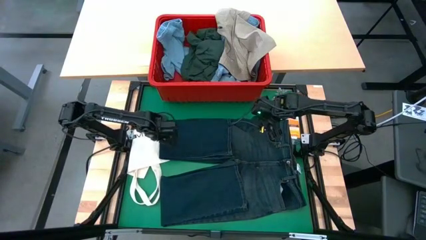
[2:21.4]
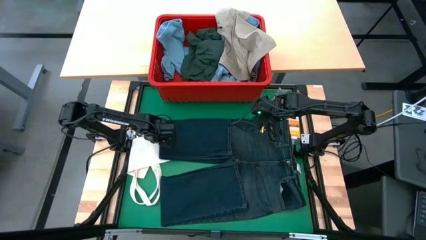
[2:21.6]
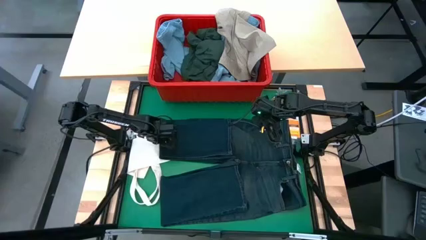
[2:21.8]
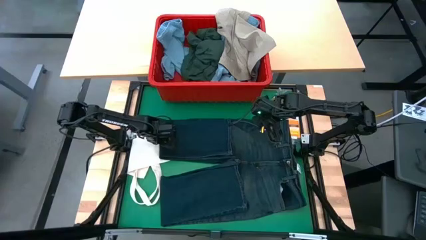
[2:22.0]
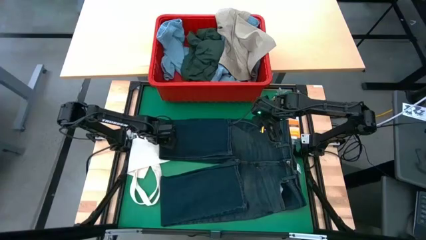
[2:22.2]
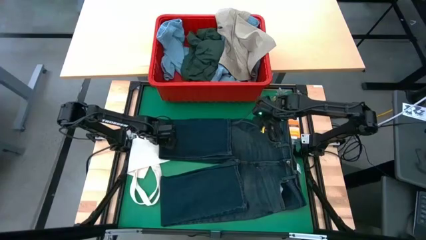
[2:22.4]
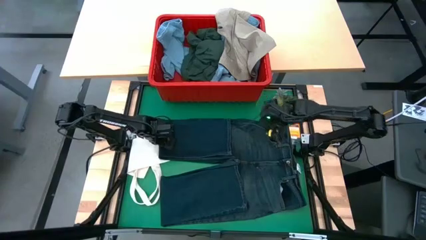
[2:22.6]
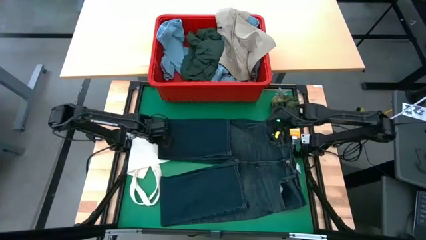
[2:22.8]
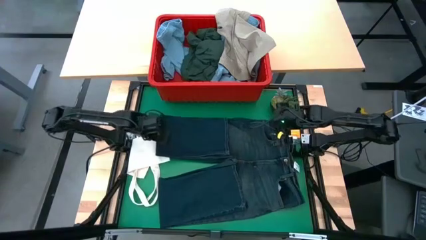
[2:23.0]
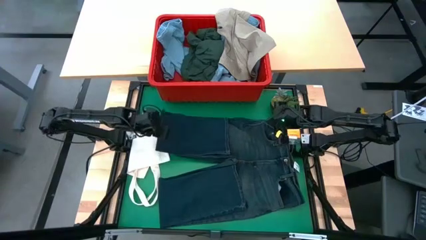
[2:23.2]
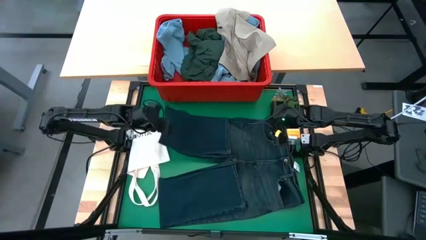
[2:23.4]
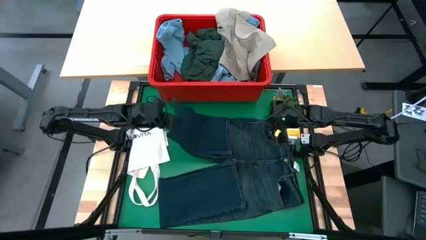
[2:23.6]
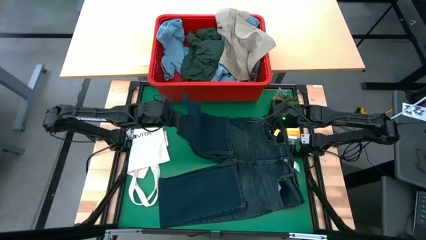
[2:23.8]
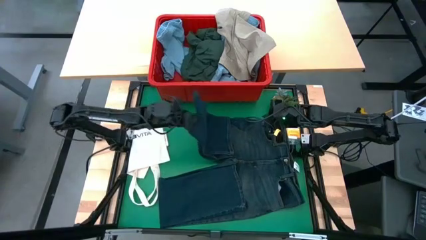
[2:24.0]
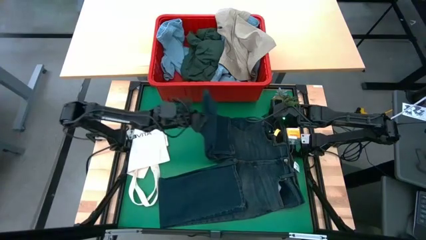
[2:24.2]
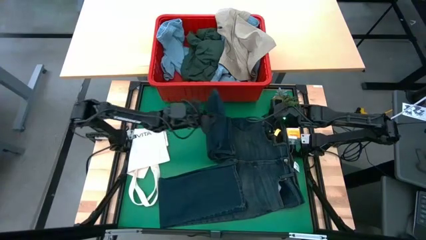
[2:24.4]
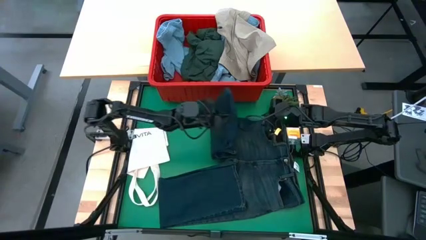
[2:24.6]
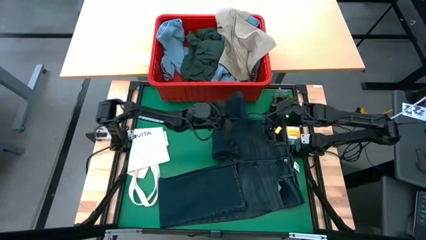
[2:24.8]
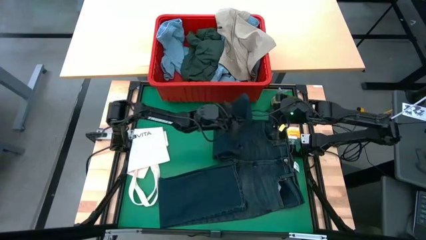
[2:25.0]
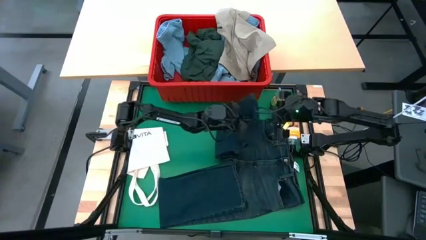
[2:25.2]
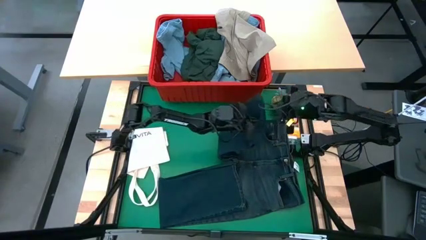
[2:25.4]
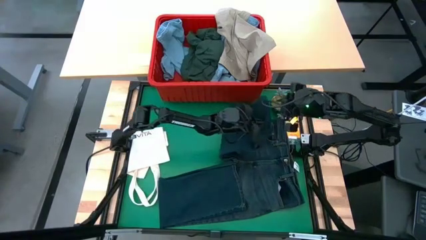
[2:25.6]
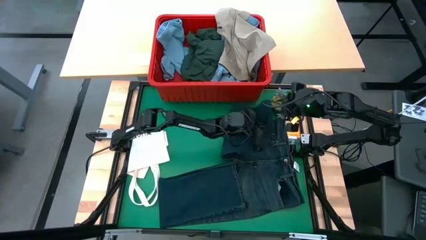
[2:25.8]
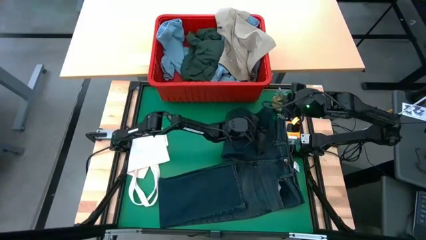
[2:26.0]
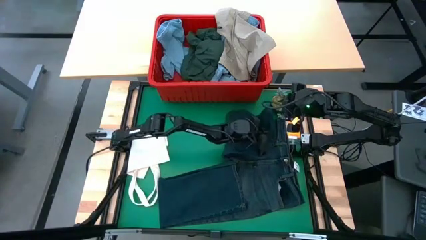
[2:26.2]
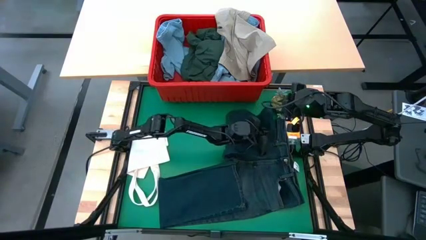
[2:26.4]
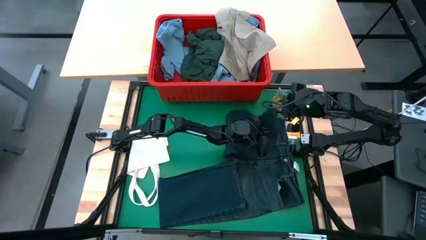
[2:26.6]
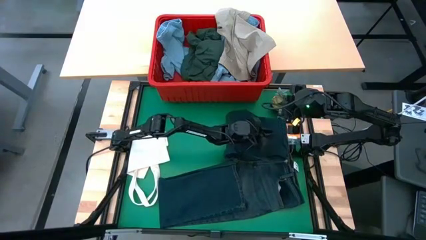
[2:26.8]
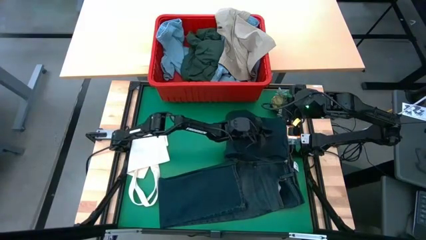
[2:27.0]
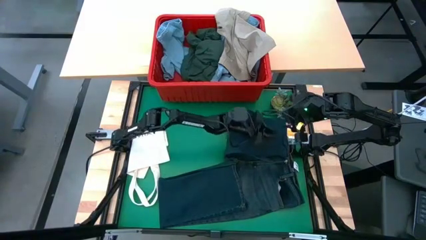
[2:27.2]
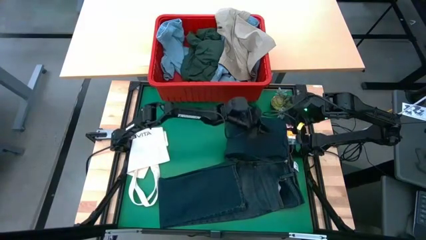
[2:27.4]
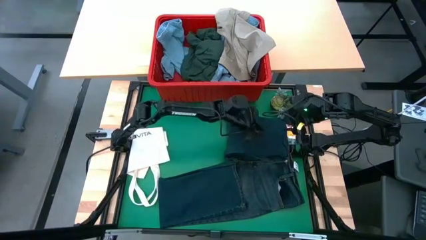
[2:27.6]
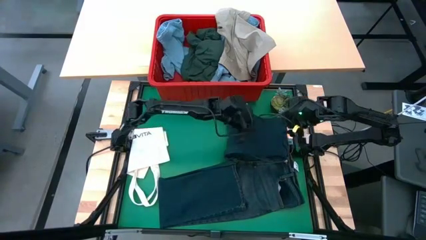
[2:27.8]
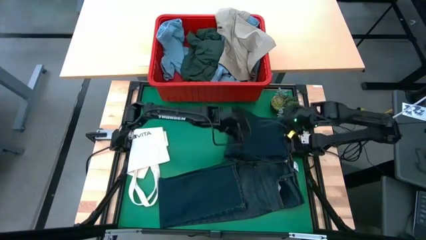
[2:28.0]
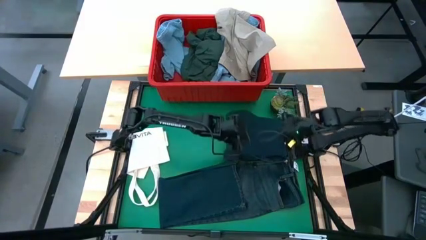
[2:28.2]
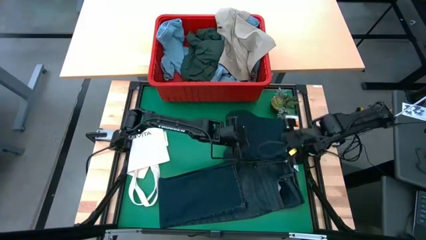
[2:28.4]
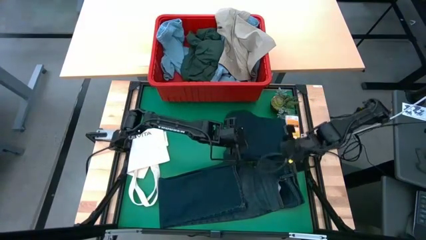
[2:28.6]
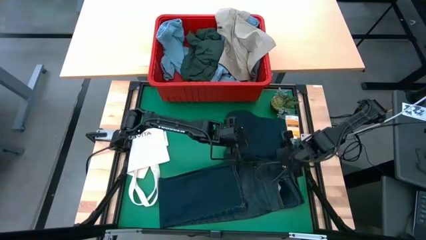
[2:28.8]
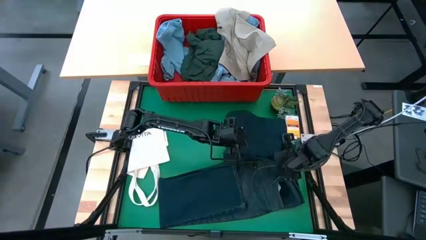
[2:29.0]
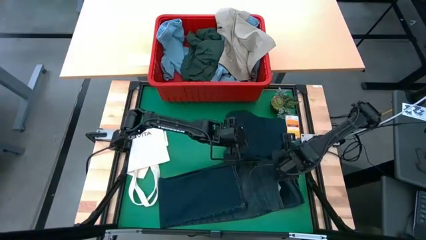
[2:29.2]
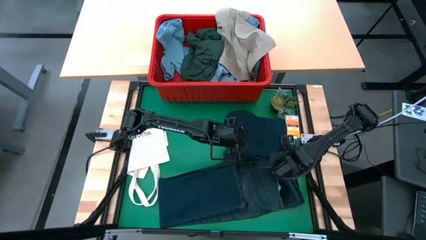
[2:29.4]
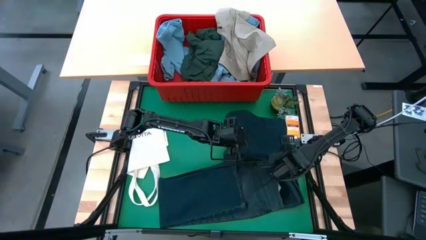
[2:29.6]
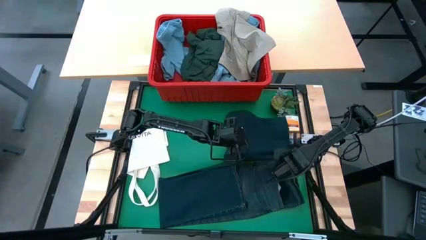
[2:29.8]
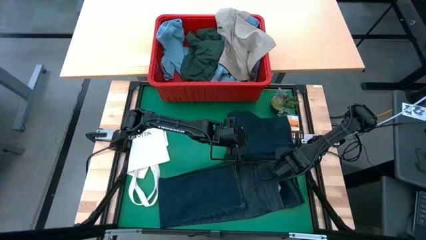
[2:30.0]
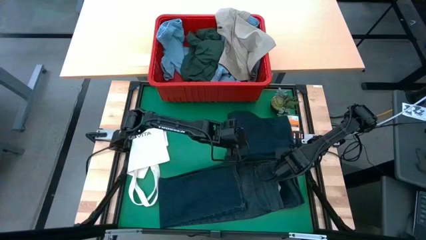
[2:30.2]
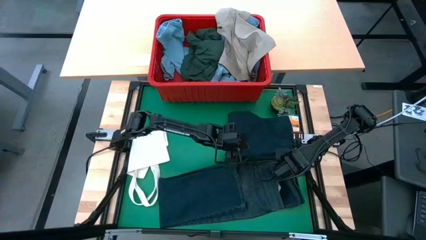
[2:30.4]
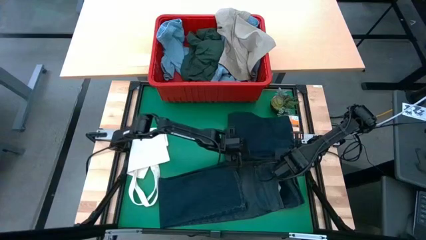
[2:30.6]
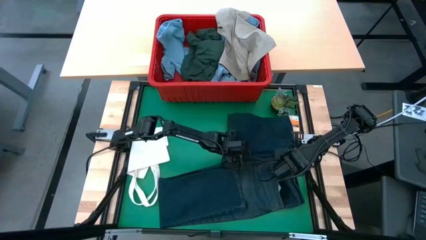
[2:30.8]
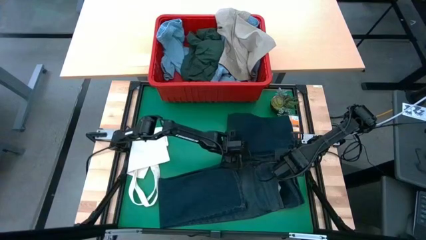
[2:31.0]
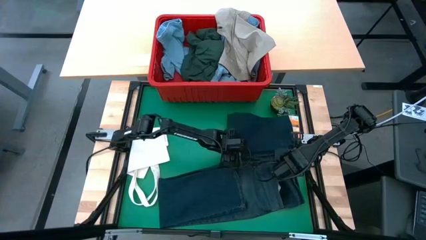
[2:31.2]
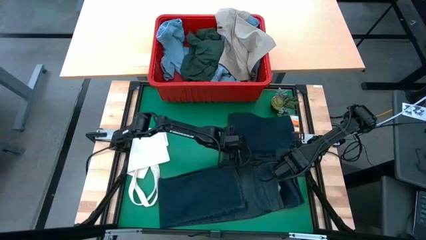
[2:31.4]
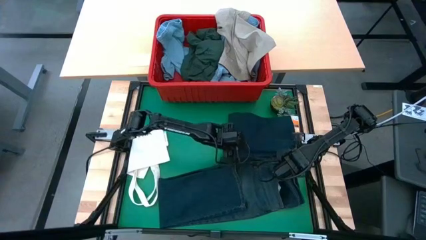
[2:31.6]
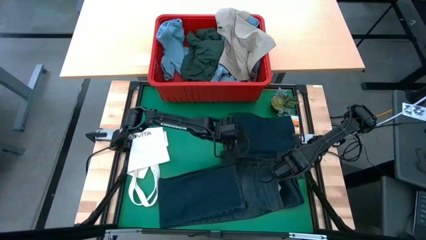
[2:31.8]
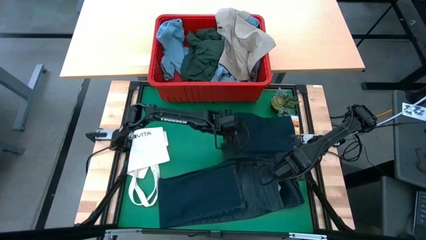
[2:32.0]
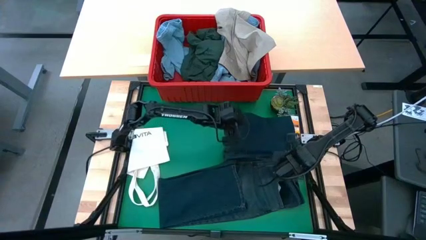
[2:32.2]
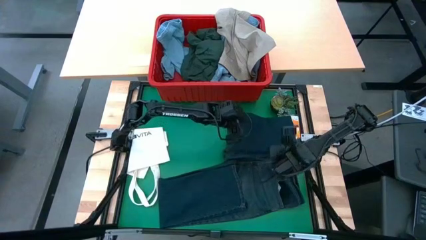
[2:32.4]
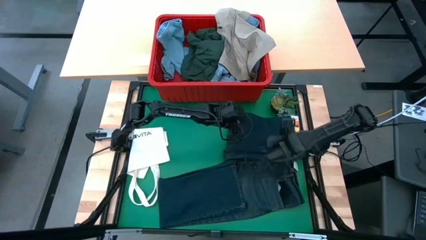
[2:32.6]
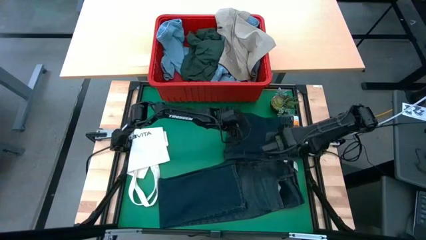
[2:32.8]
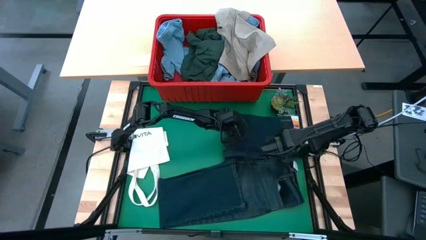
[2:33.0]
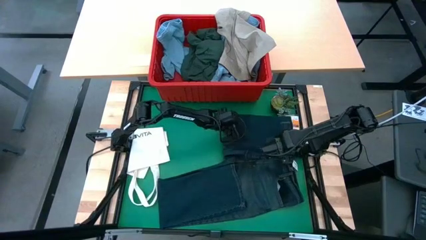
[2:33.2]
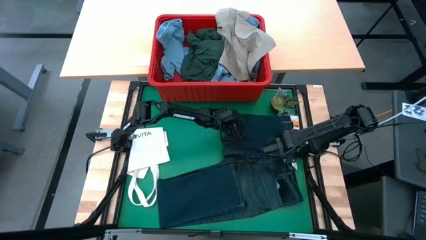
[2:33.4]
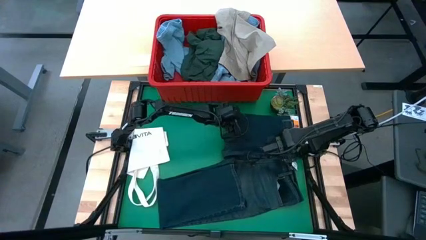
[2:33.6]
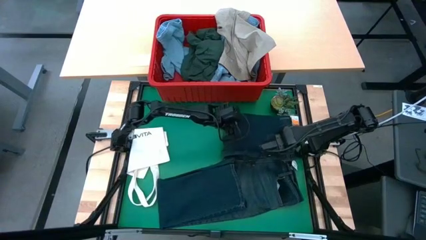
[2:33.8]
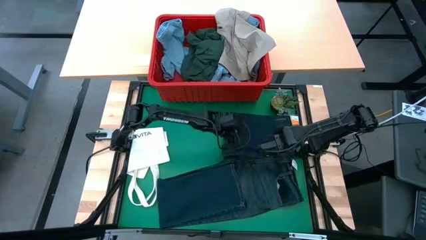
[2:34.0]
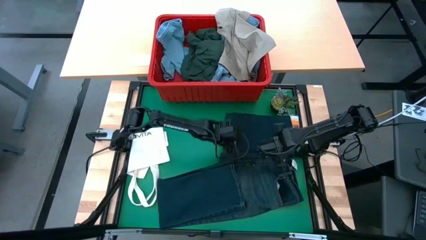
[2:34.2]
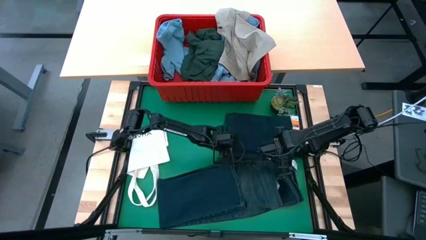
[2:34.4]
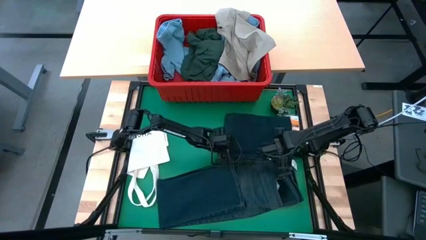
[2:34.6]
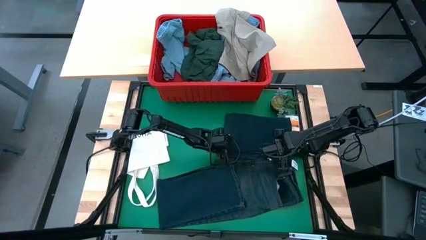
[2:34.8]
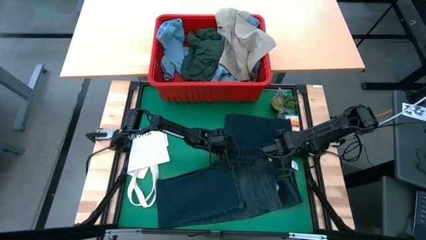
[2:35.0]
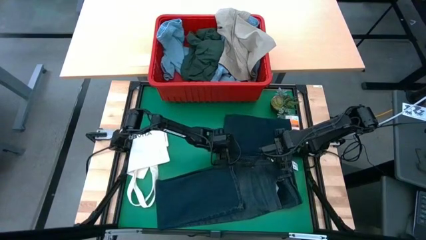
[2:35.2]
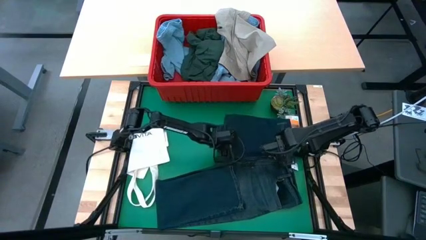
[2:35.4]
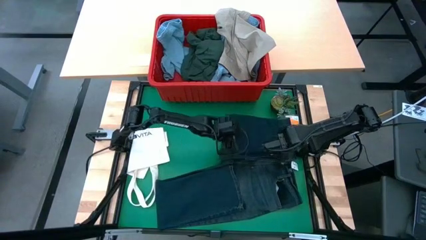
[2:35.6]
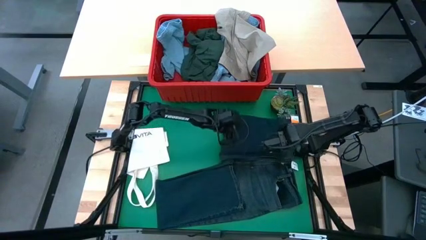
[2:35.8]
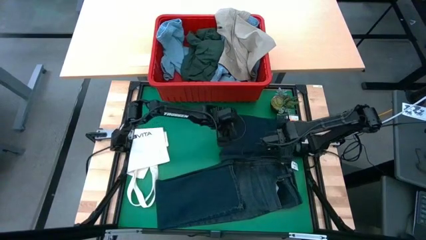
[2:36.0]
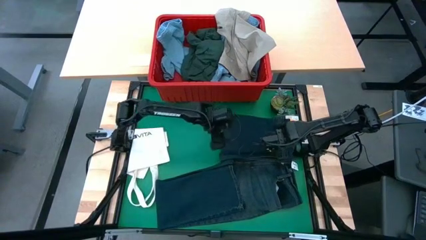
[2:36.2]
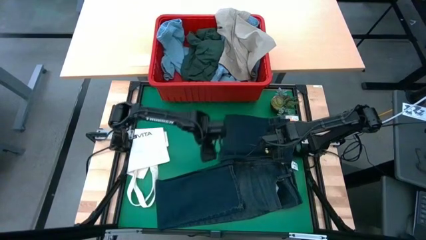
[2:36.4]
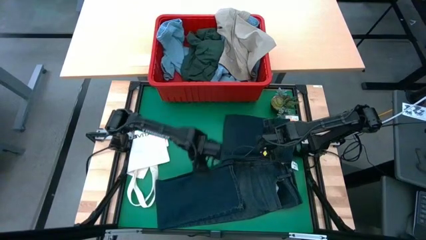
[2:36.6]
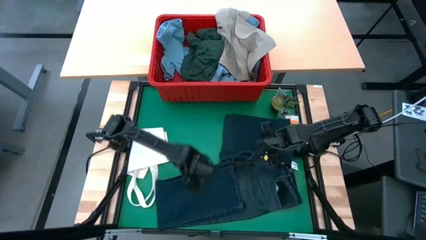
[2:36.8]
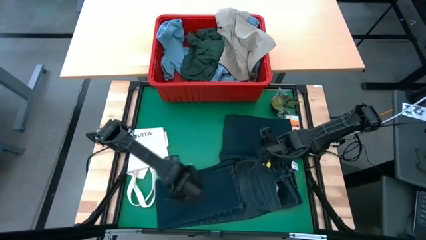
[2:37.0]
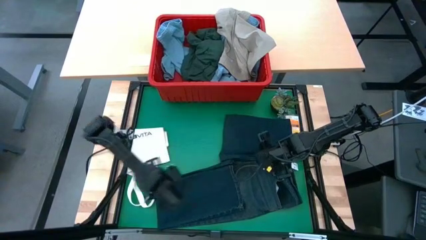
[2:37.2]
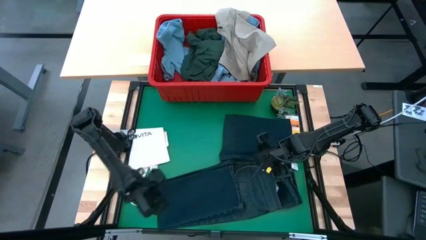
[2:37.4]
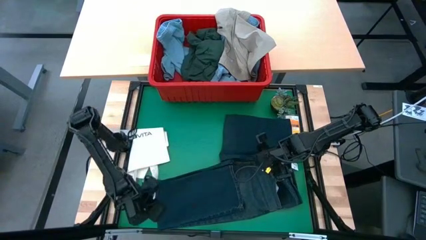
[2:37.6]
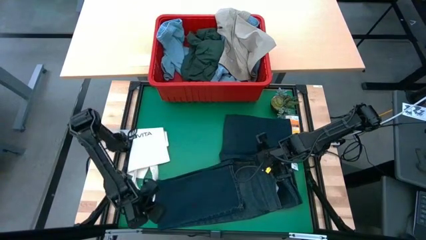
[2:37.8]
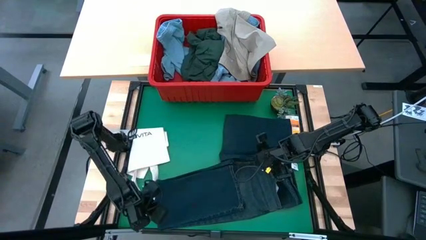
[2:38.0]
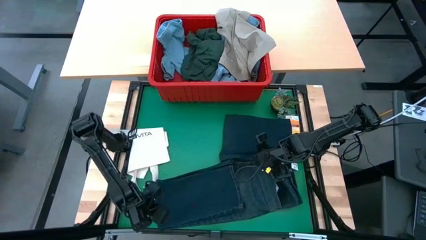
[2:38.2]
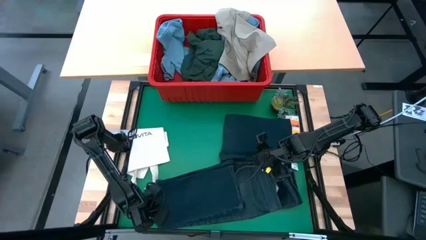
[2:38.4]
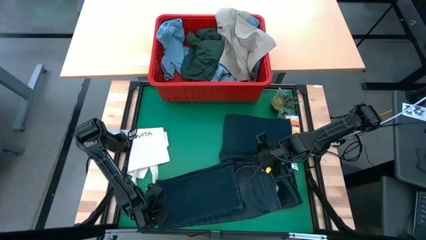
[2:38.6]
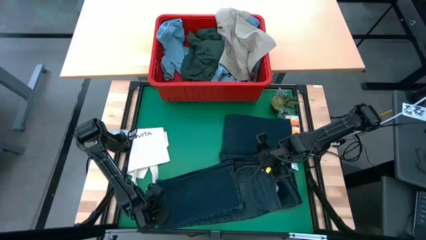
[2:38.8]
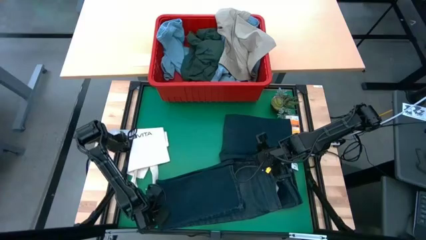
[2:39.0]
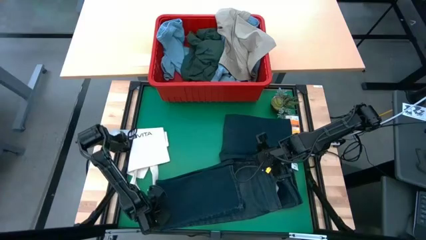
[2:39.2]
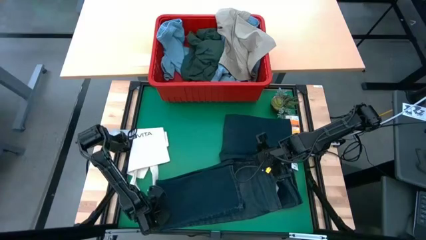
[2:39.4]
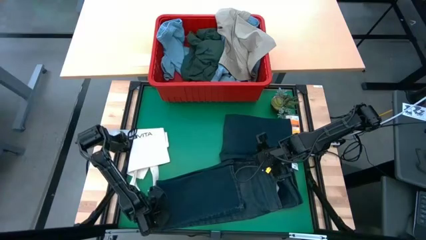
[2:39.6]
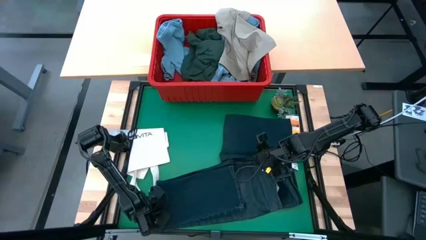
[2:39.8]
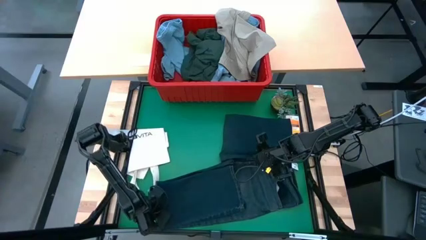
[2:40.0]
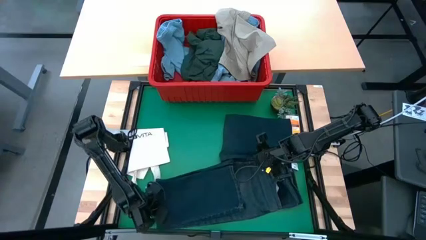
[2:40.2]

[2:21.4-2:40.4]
Task: Fold laundry
Fold the dark blue pants
